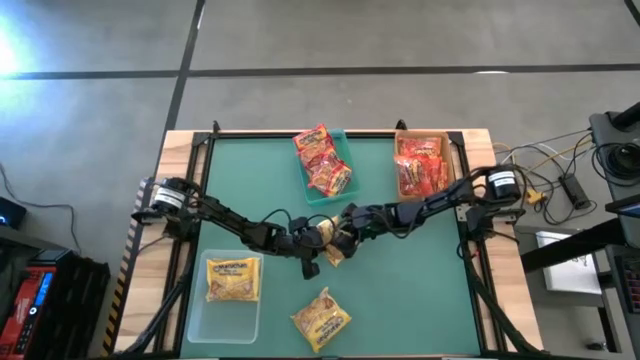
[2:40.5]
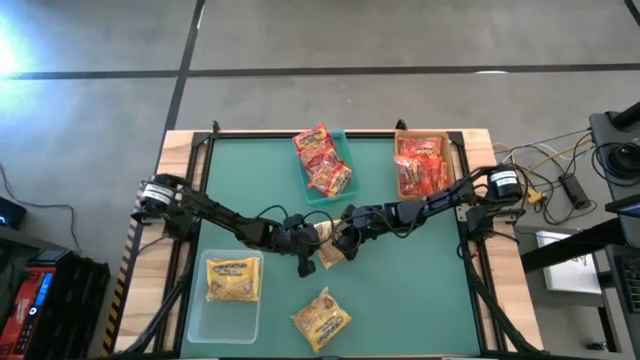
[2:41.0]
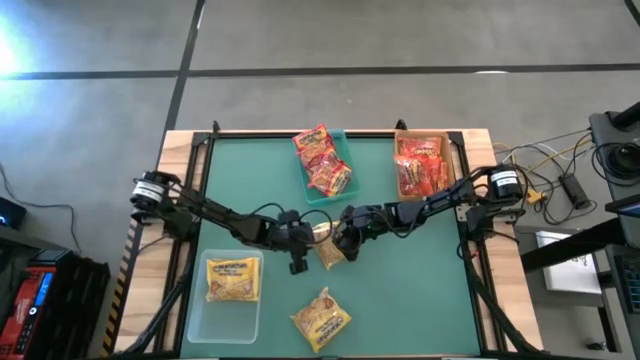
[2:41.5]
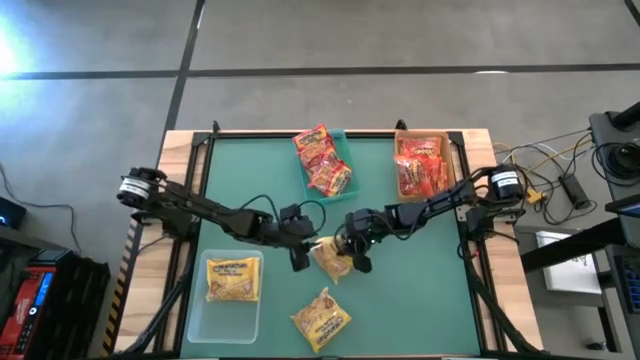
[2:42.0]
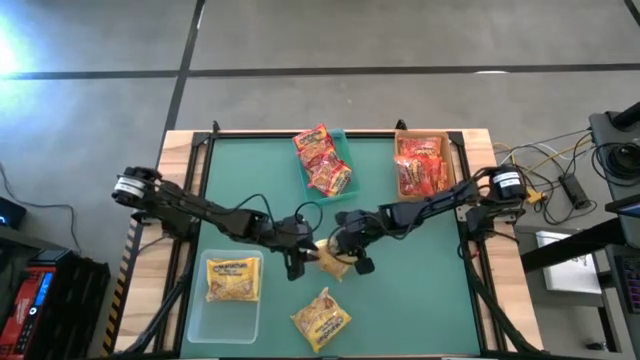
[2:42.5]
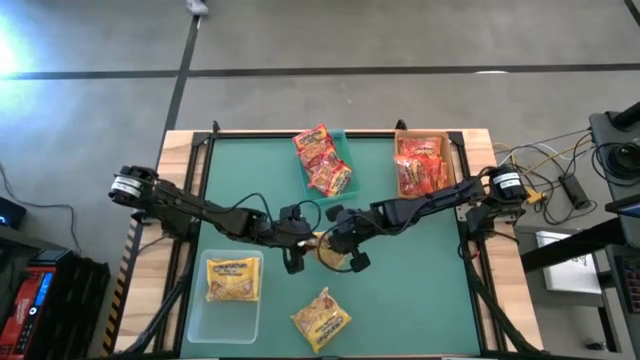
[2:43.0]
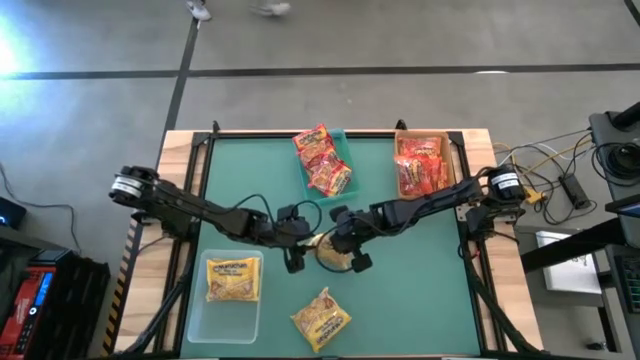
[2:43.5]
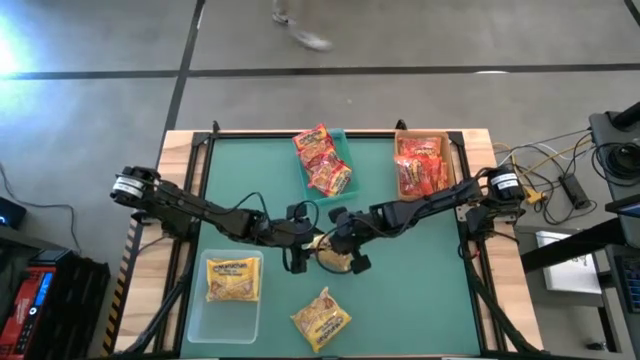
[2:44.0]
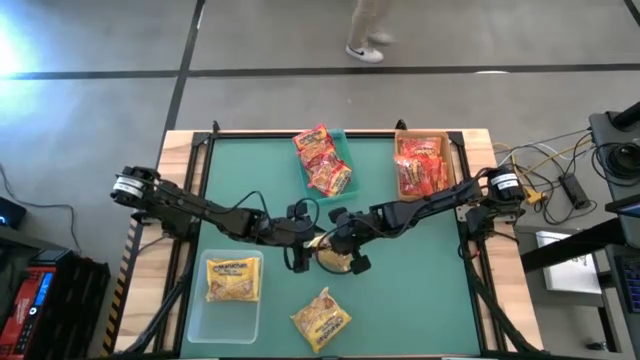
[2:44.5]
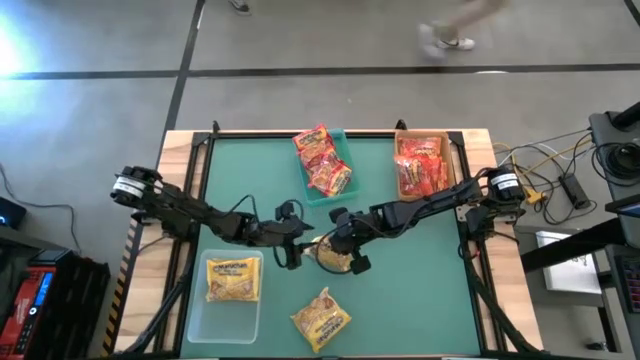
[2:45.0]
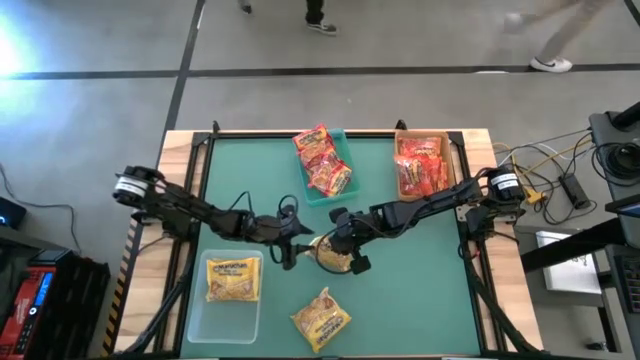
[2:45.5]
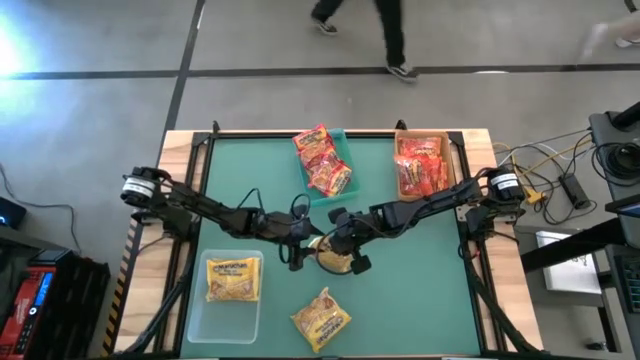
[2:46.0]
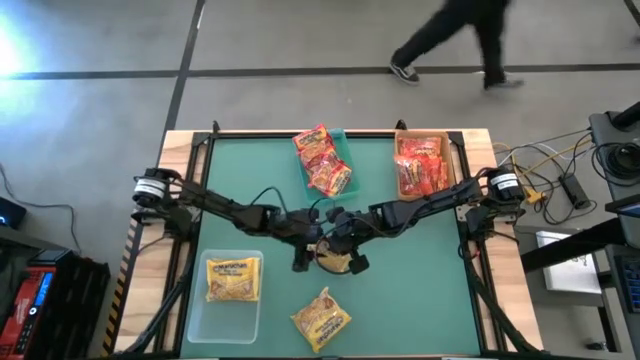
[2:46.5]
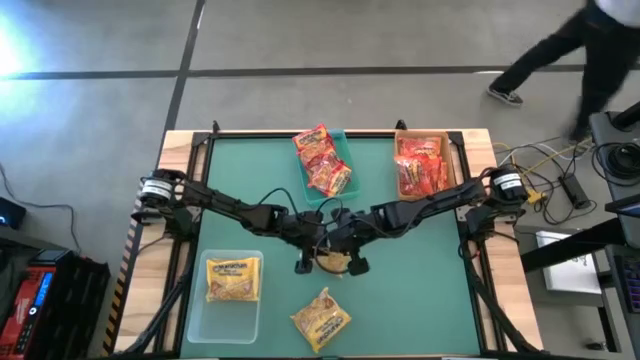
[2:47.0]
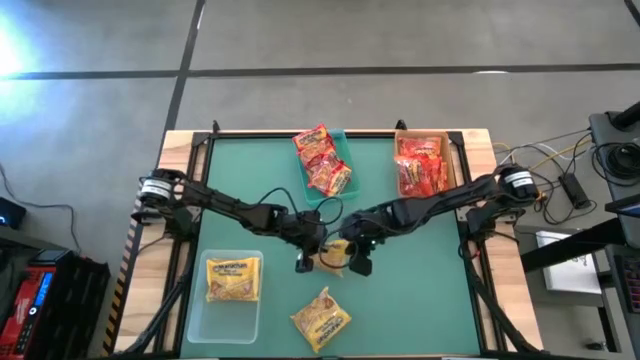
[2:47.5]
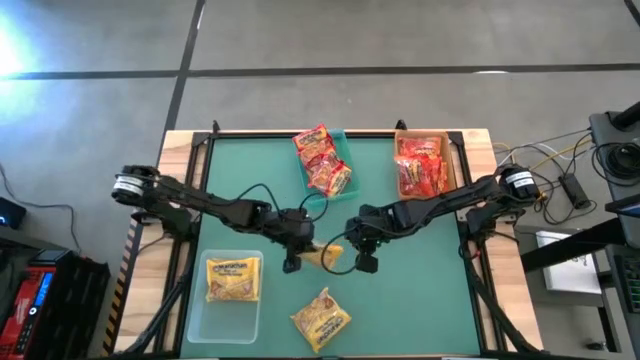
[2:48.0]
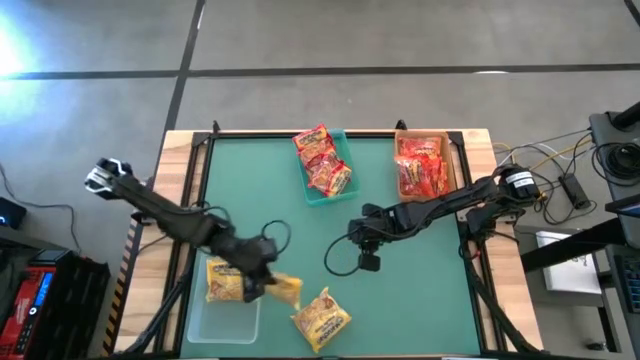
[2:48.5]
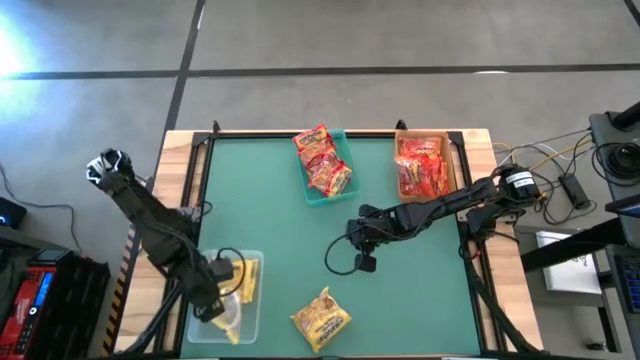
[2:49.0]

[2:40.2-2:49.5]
Task: Sort Maruchan noodles
Put the top yellow noodle pack into the transparent bin

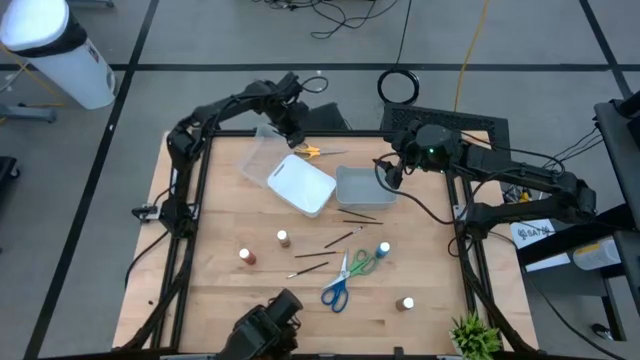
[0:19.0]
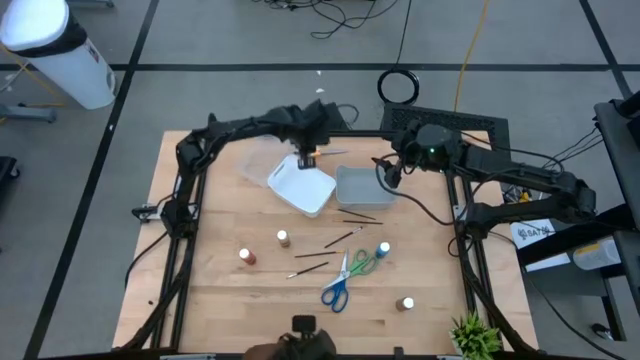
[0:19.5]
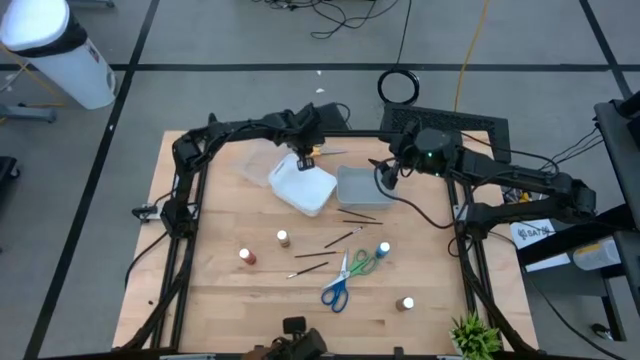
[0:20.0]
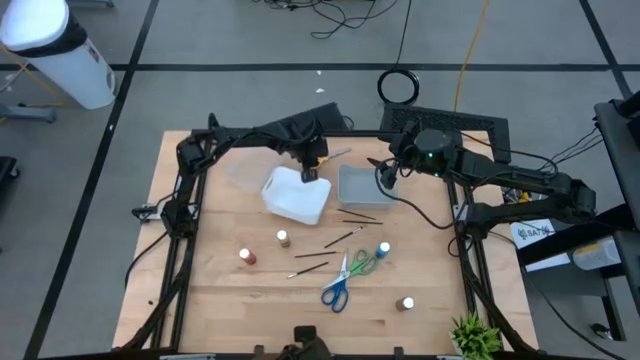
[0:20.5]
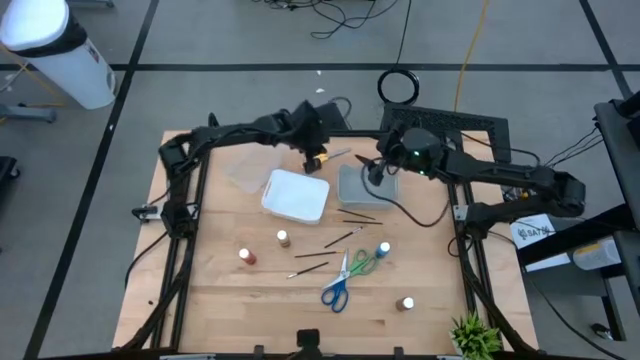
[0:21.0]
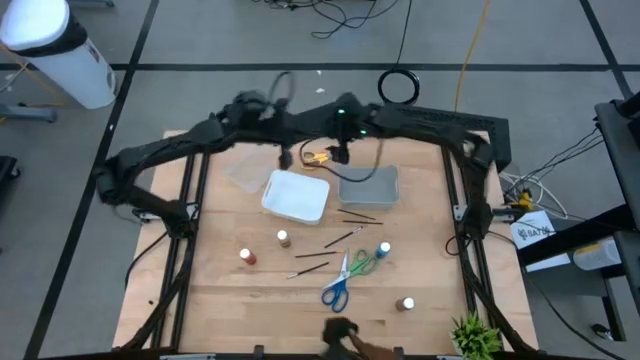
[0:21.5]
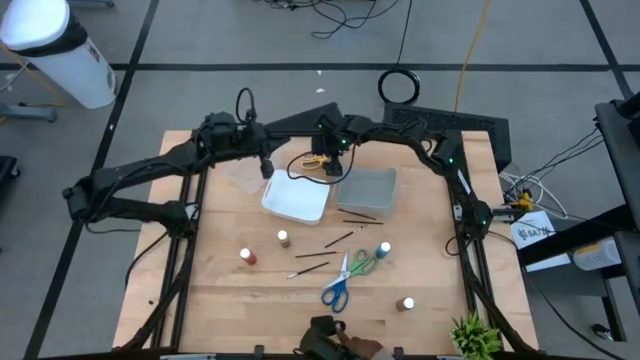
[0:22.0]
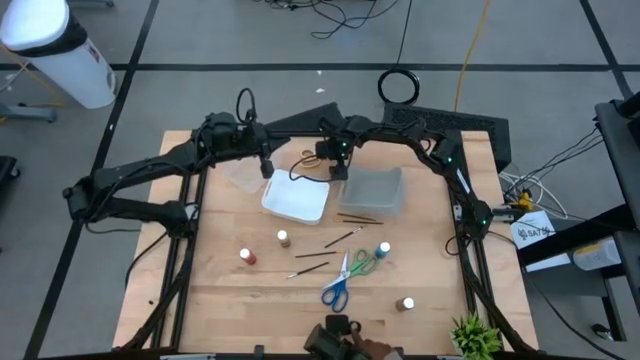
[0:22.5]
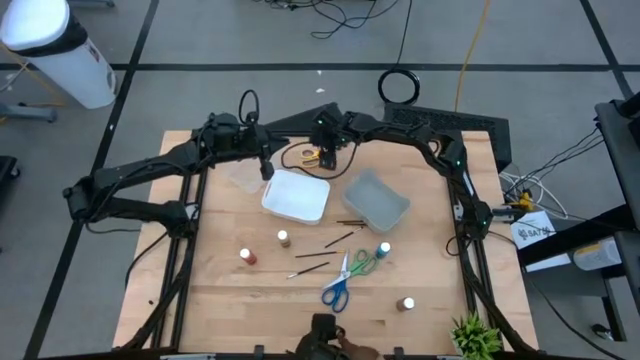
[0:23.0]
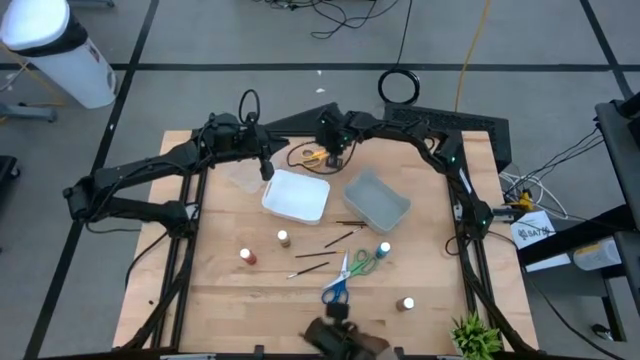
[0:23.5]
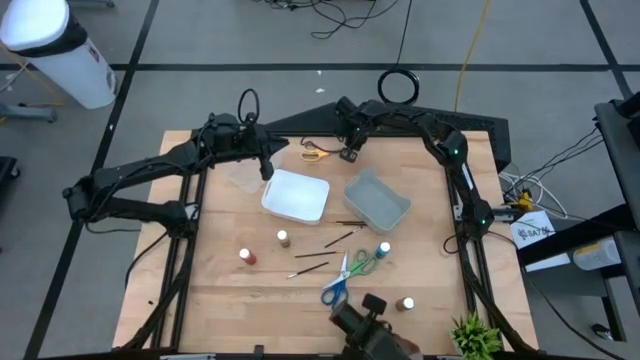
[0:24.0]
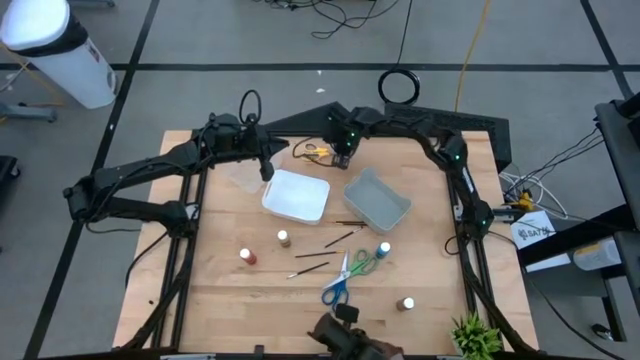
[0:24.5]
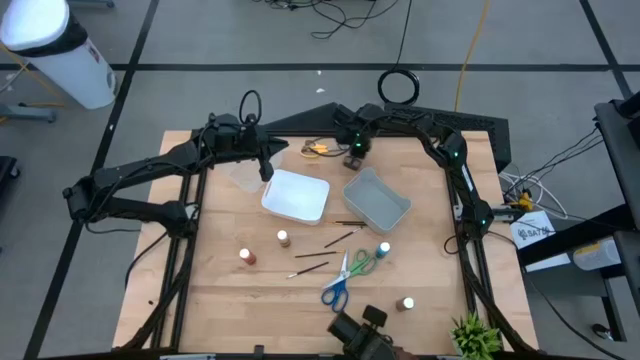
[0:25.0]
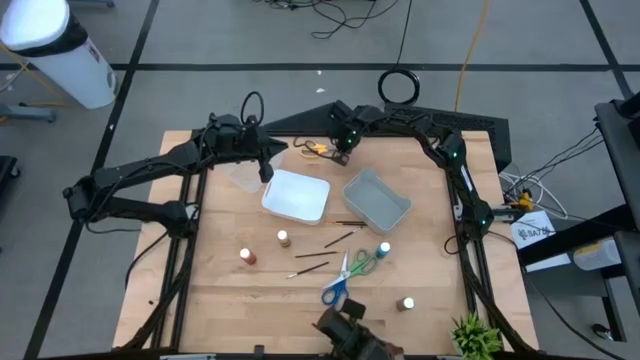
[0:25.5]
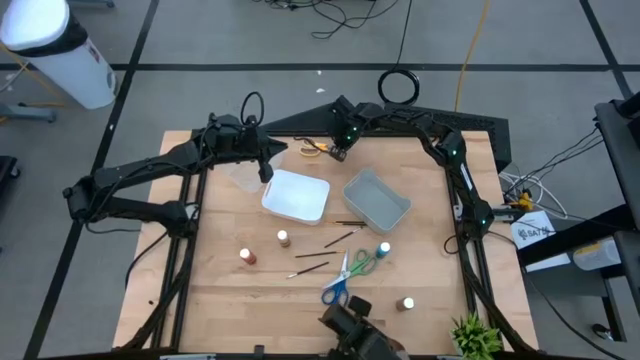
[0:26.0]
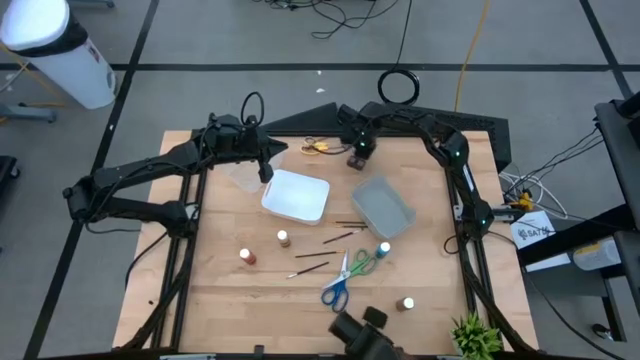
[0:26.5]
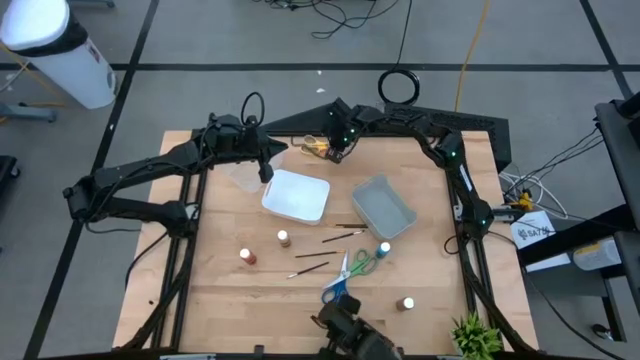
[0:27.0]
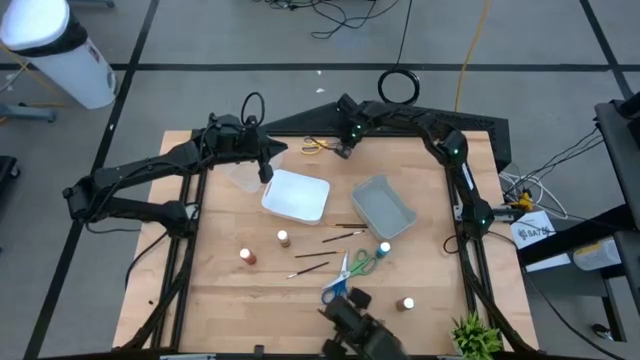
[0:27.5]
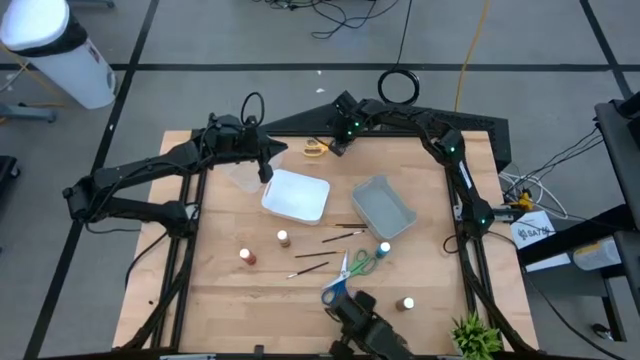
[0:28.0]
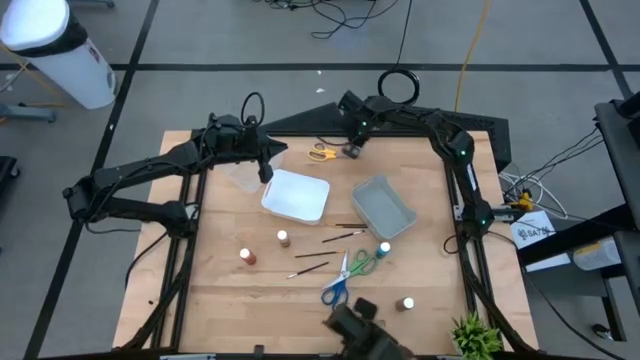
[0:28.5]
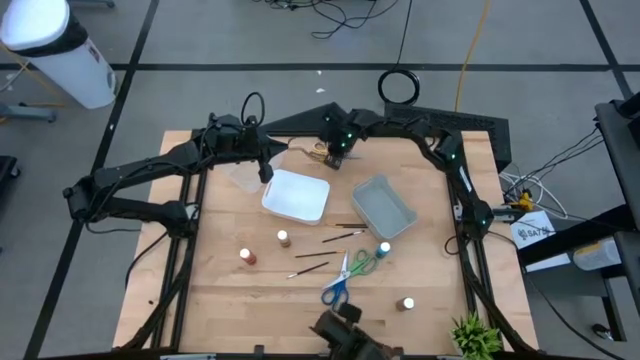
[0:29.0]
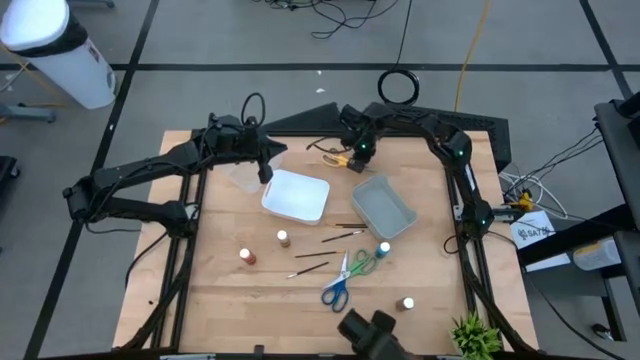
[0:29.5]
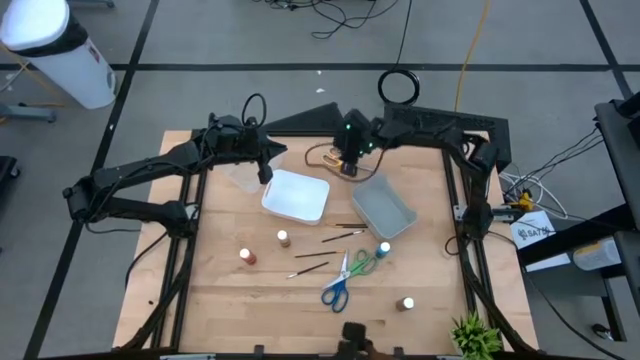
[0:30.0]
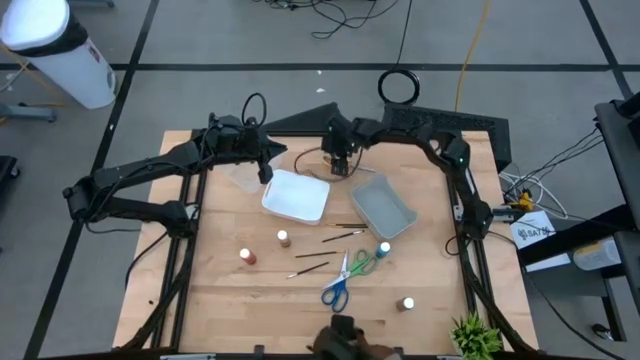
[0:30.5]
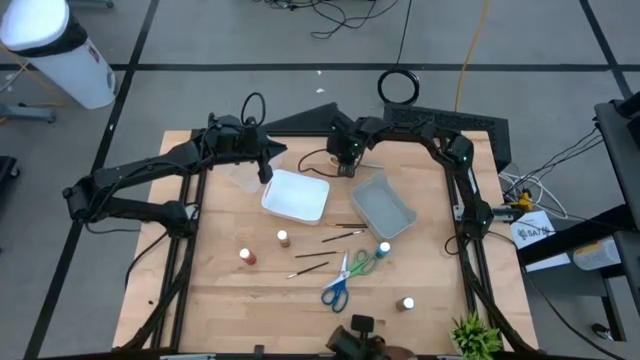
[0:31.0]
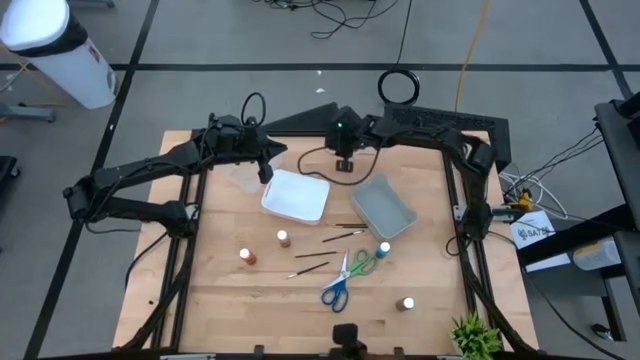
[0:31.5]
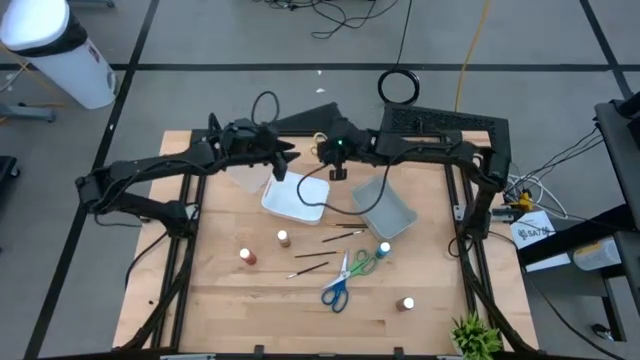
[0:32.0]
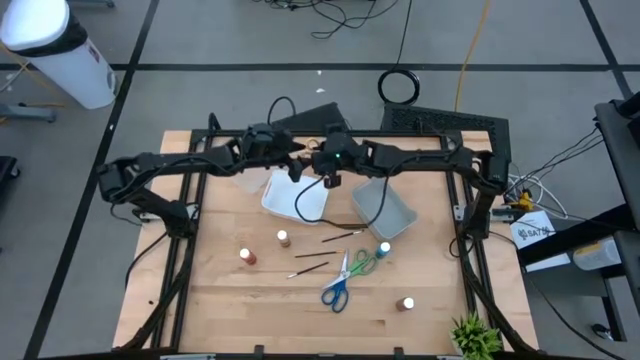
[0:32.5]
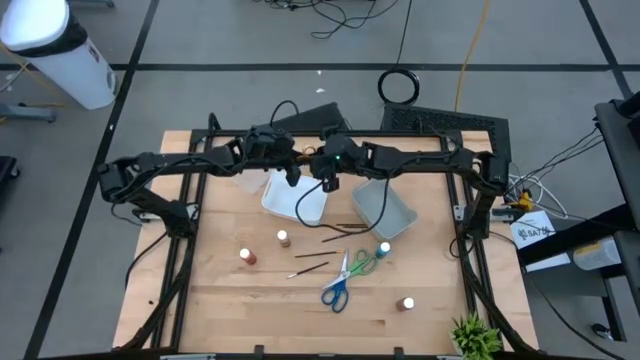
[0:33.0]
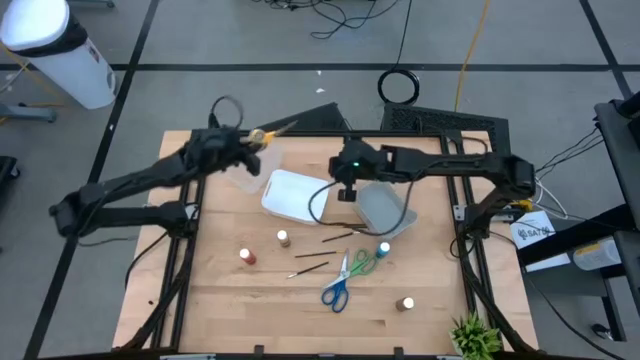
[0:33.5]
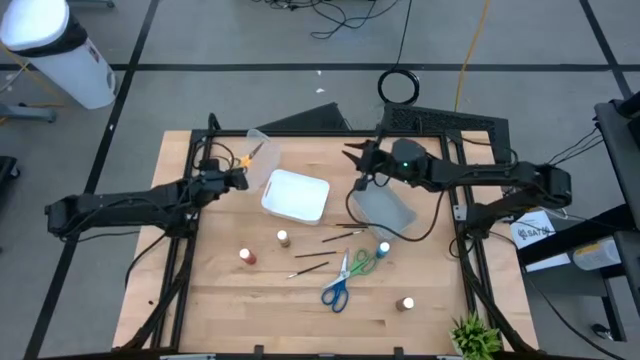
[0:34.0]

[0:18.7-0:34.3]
Task: Pick & Place Paint Supplies
Put the yellow scissors into the transparent bin
